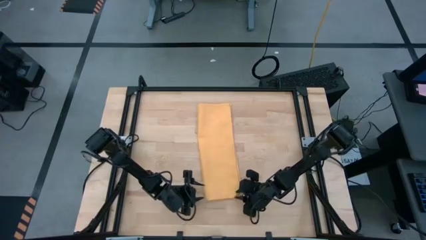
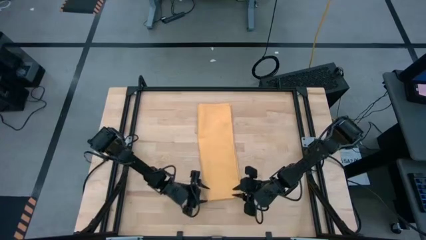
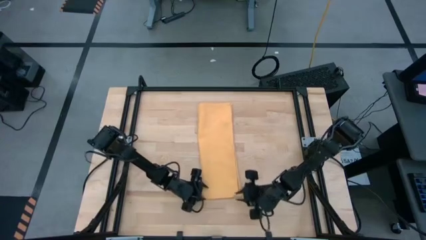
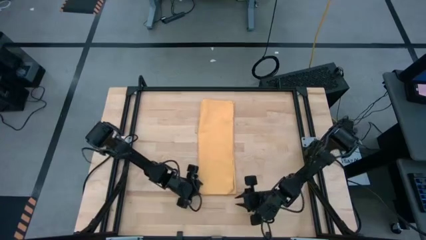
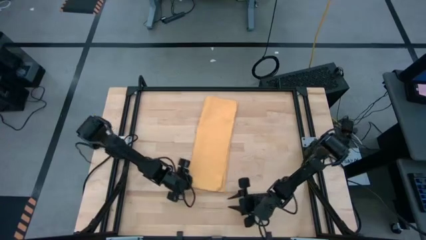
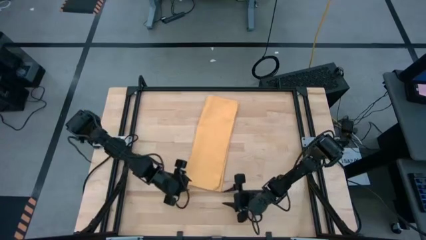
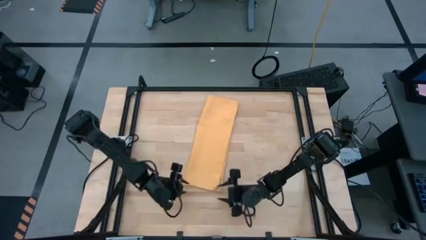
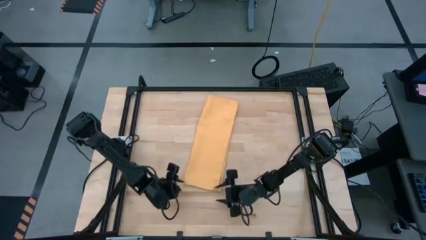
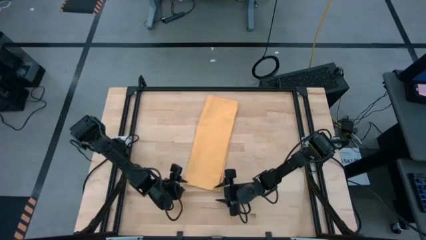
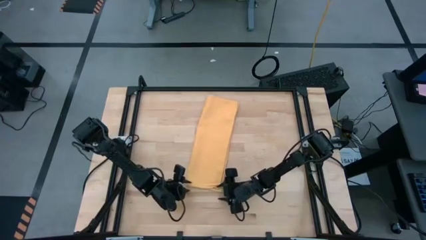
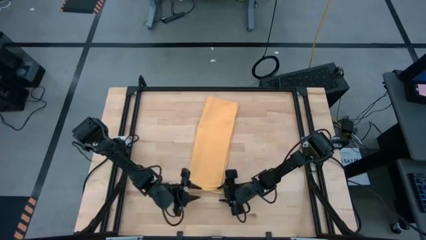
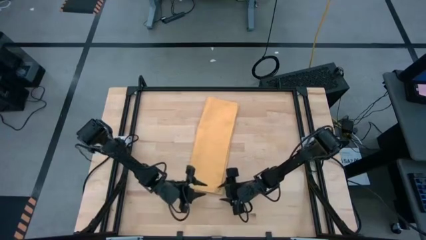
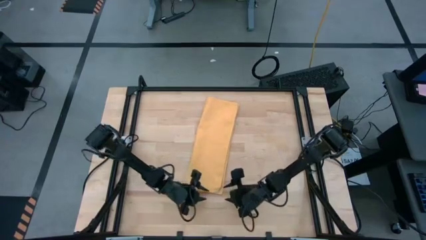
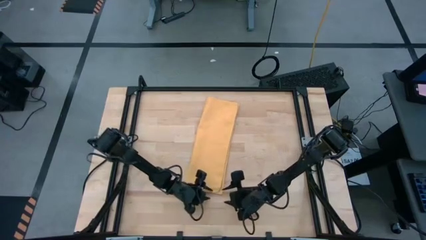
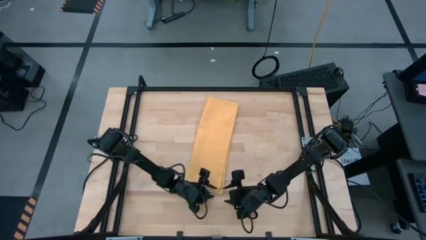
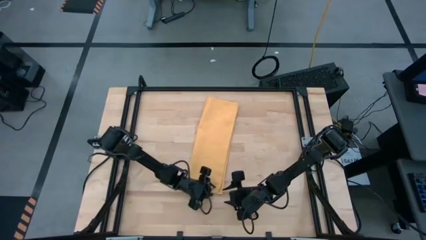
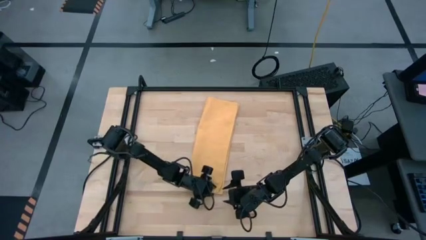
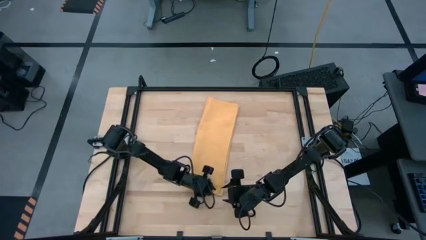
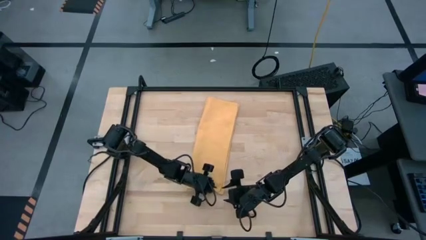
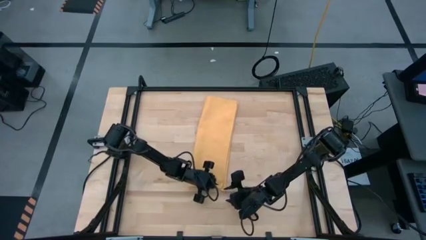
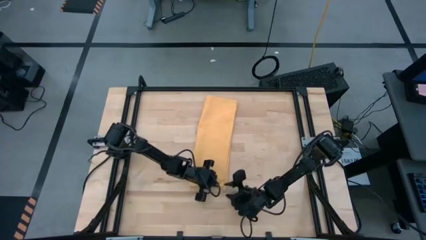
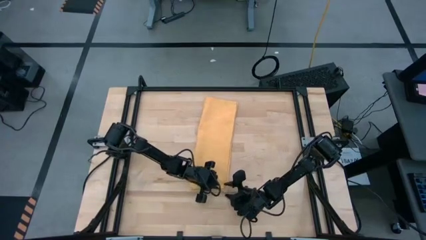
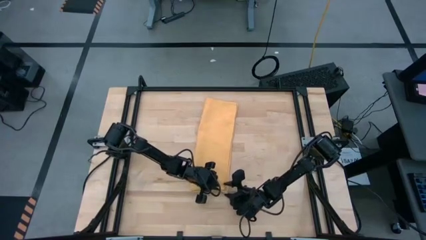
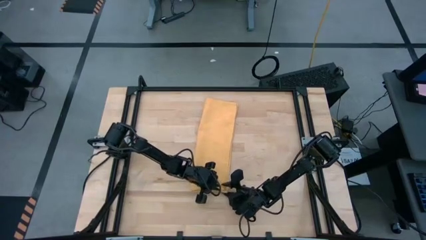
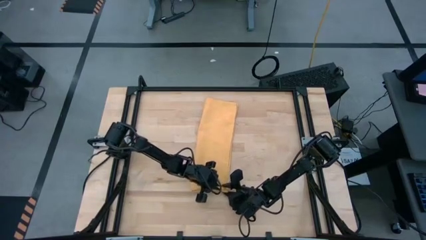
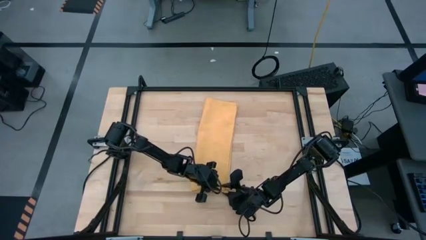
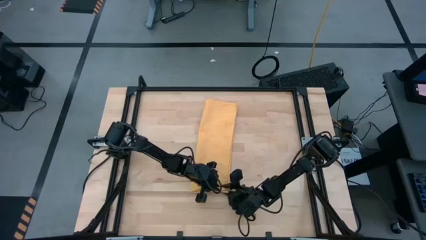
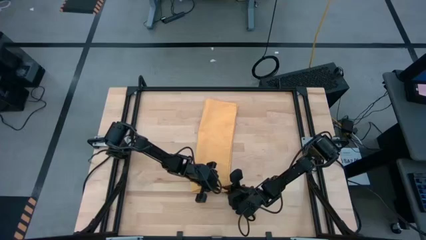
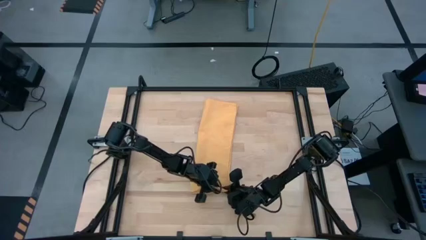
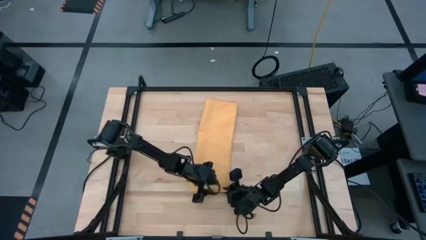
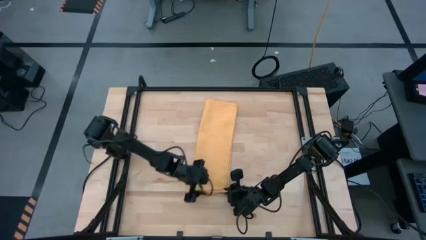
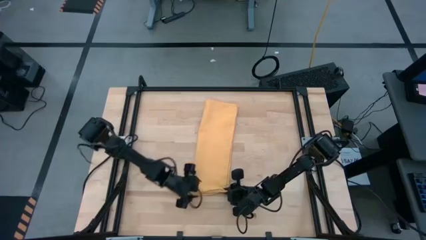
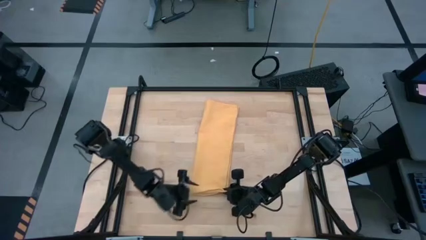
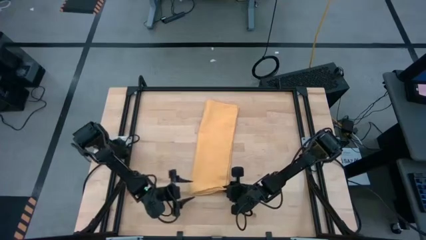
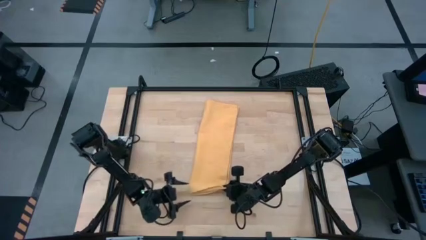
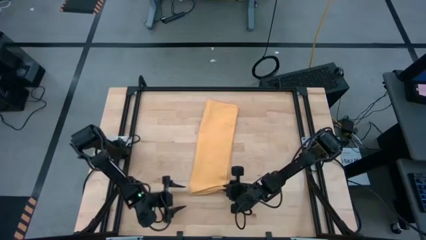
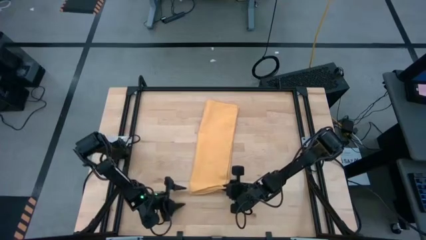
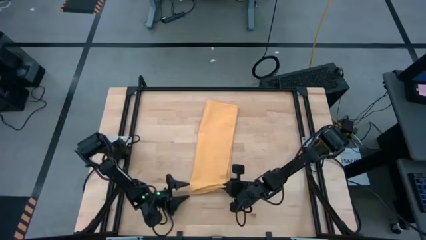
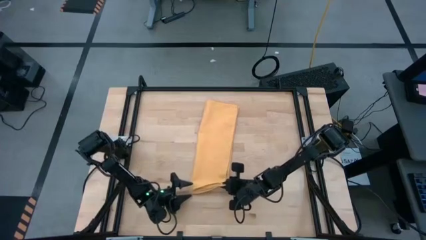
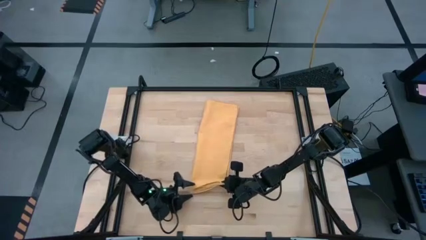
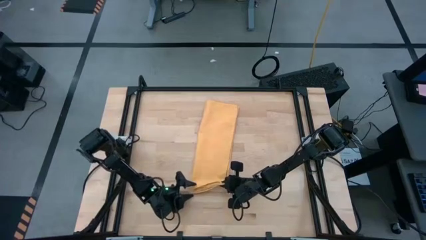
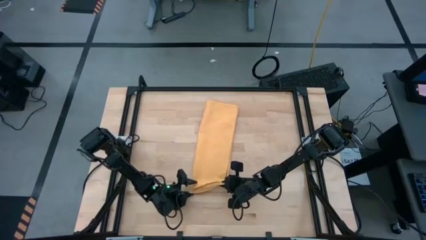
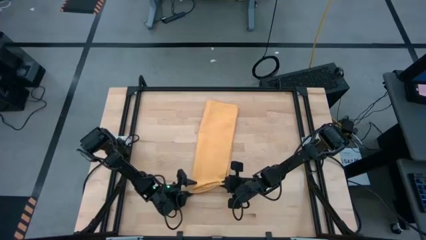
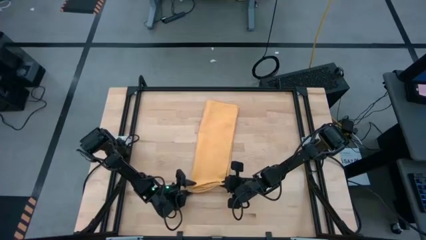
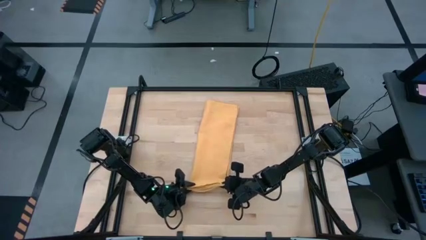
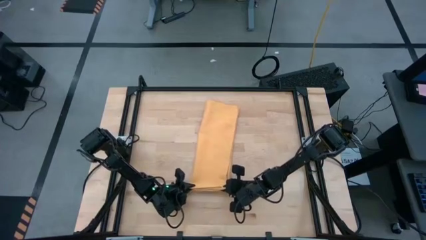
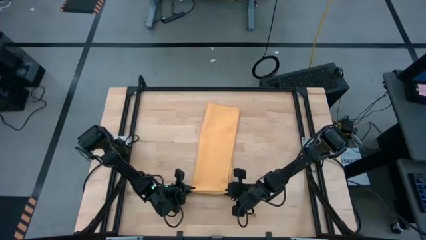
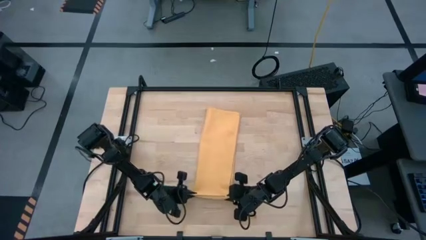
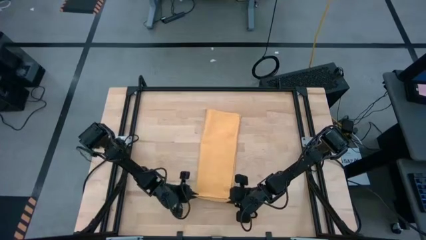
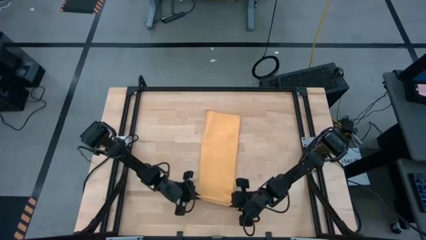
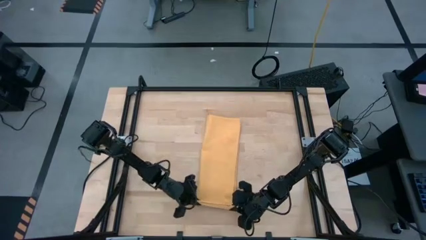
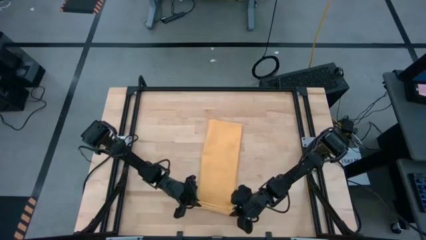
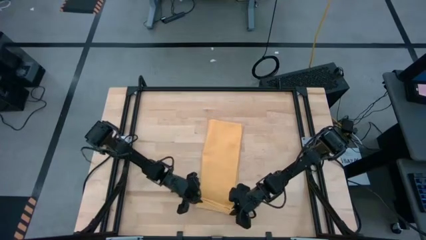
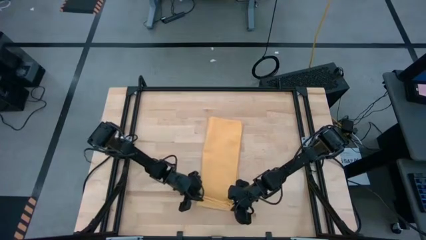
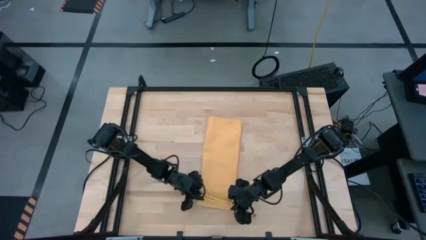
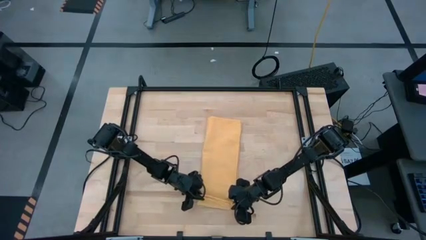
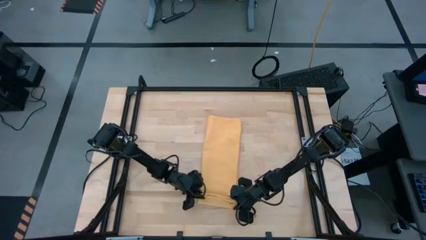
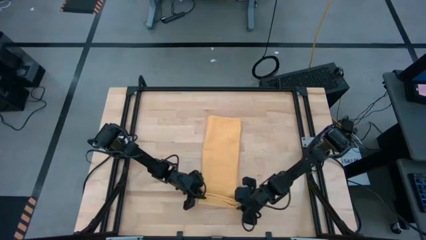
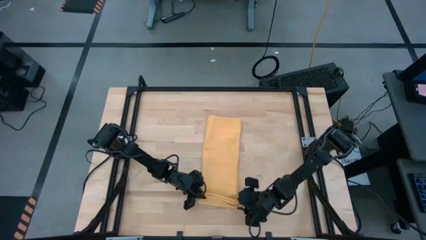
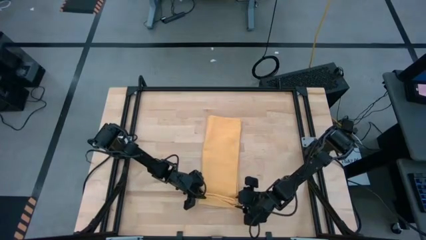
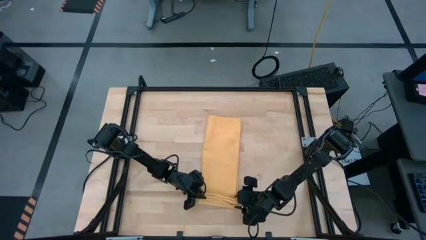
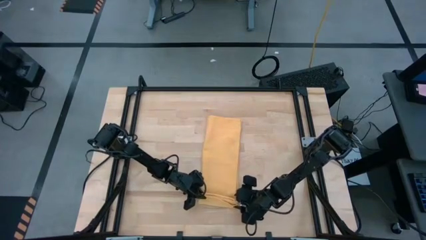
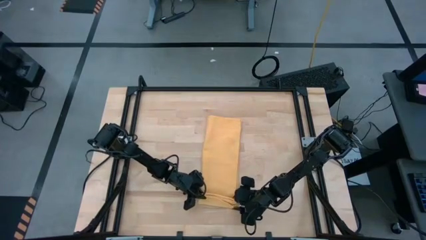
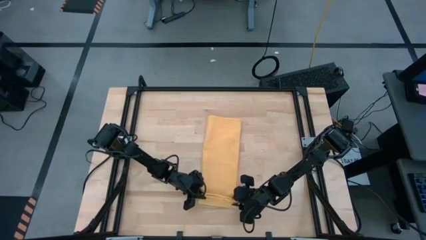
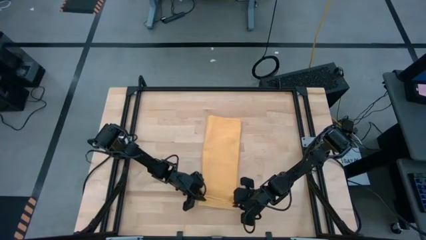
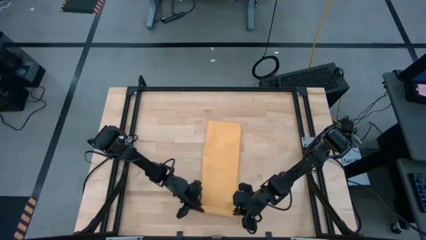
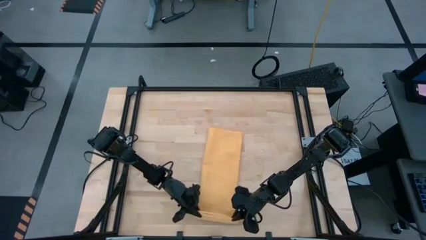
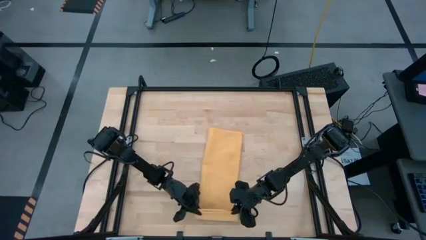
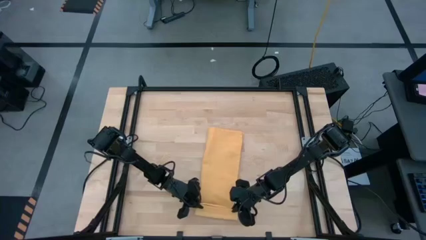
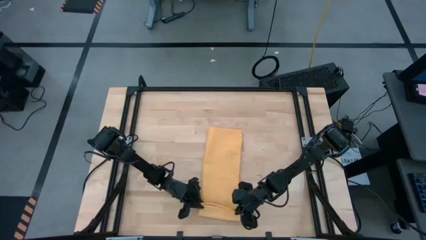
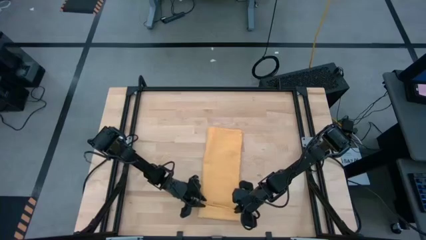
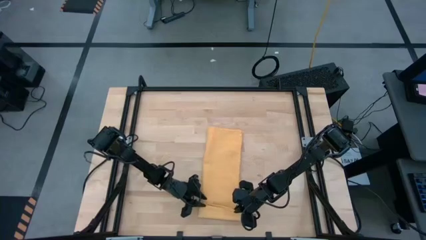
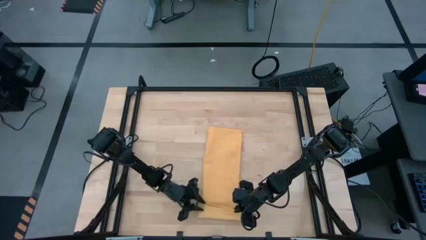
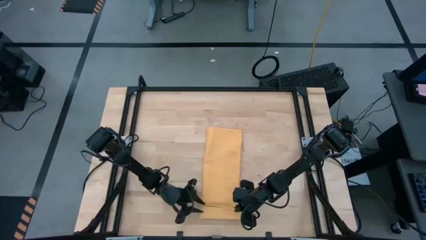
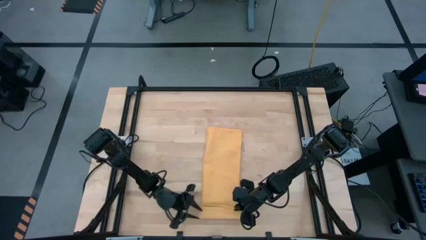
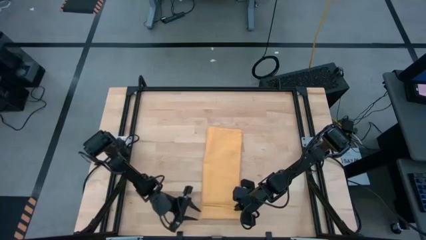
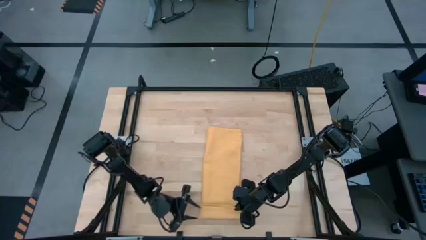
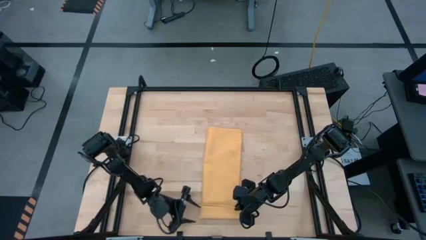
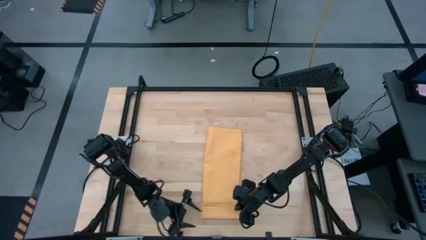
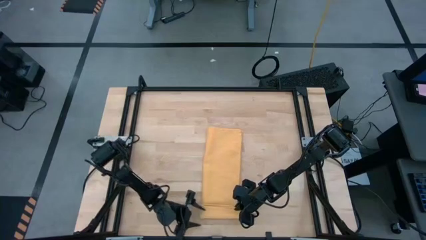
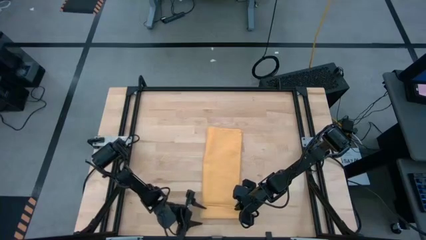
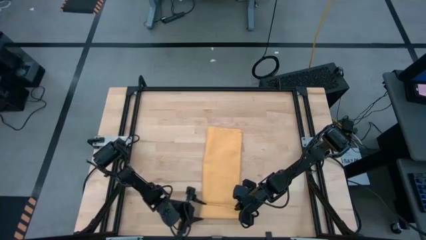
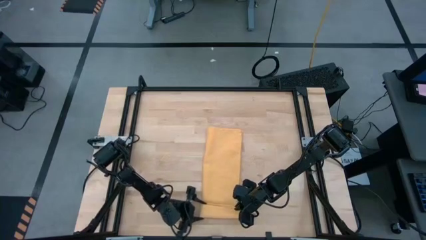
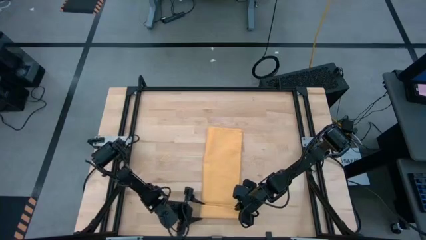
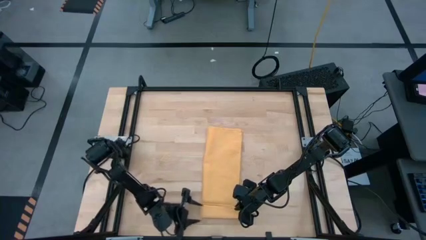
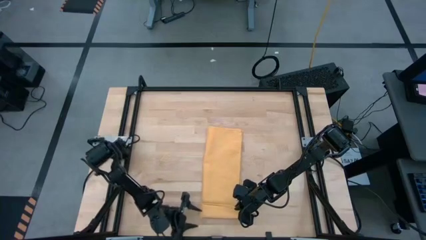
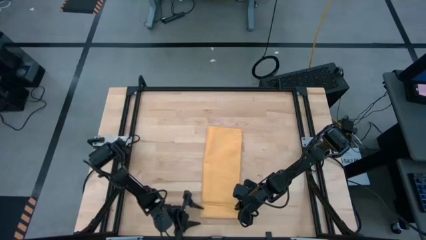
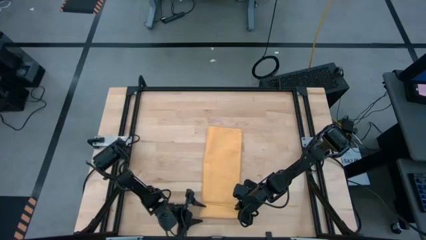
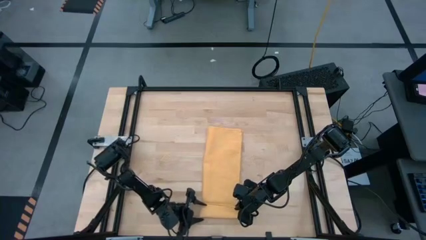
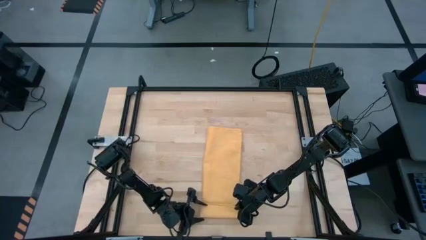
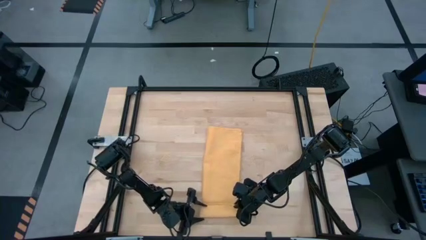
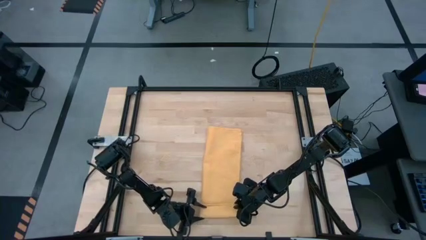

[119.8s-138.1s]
Task: Roll towel
Roll the yellow towel
